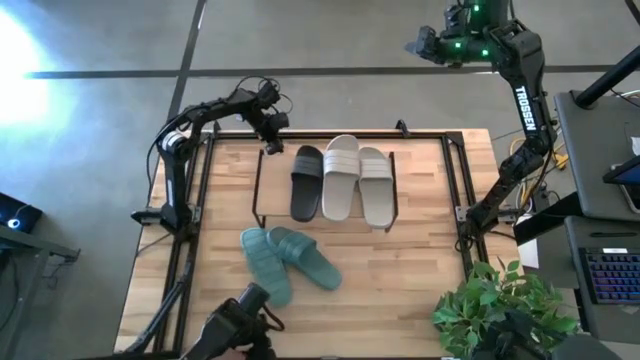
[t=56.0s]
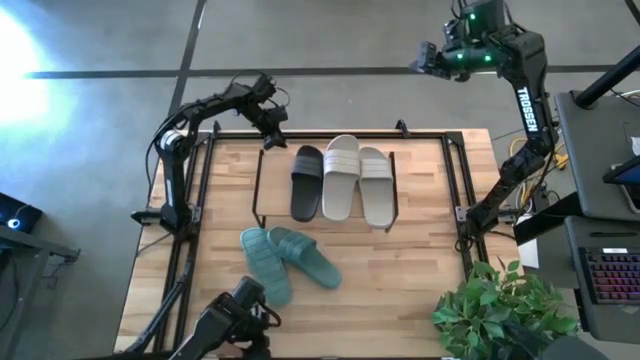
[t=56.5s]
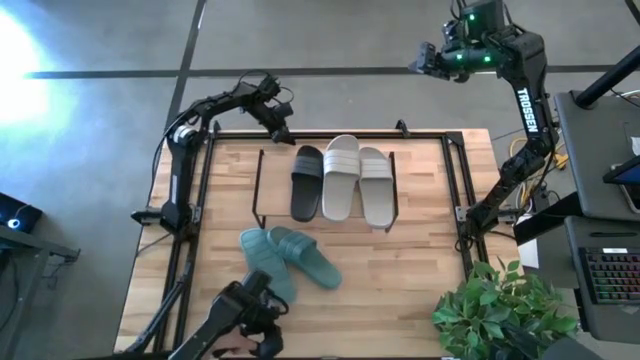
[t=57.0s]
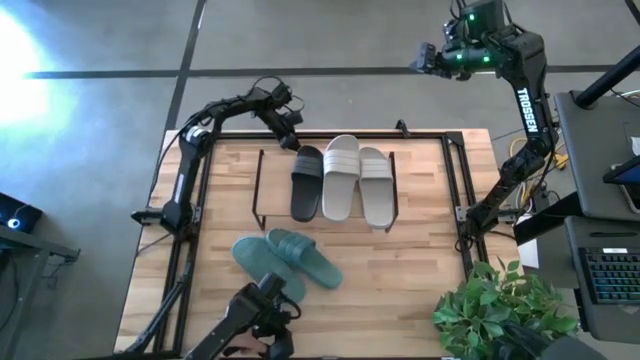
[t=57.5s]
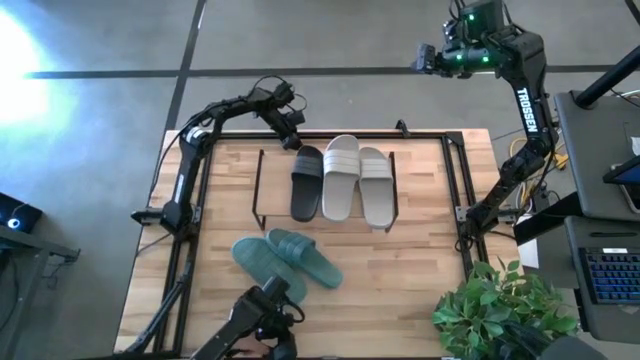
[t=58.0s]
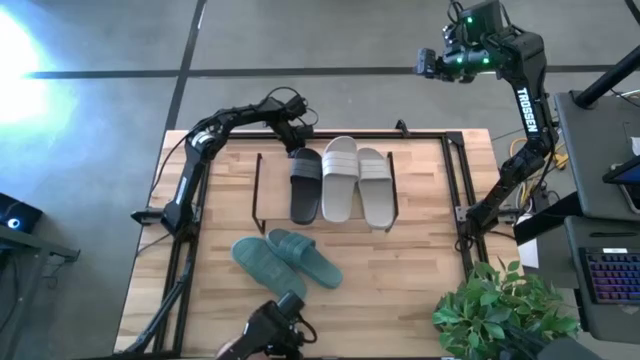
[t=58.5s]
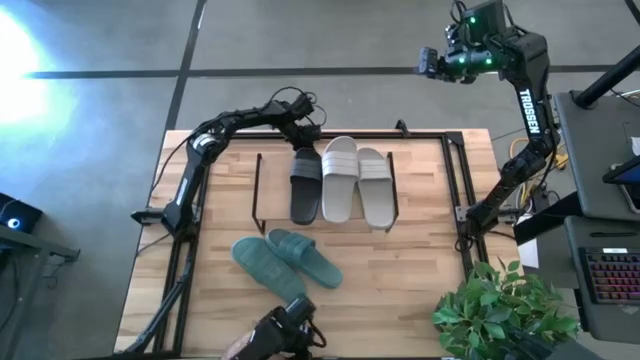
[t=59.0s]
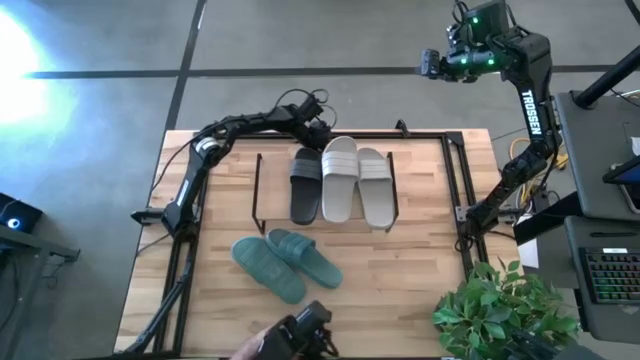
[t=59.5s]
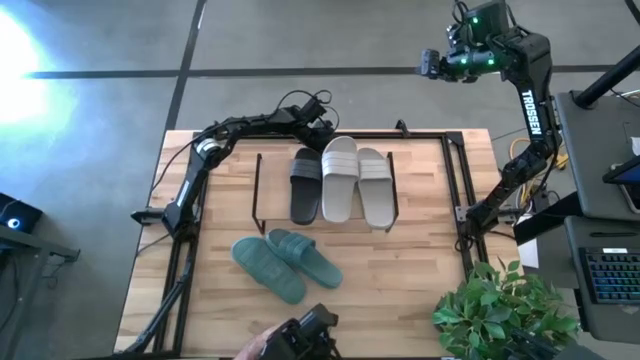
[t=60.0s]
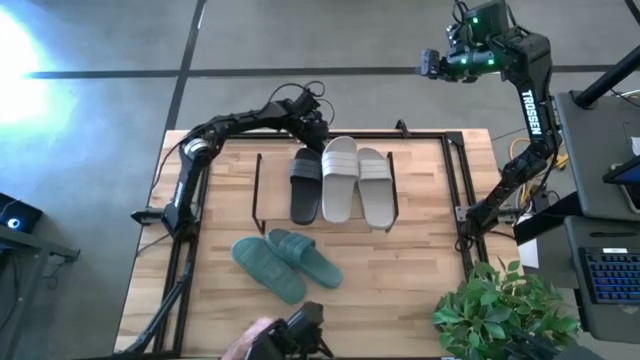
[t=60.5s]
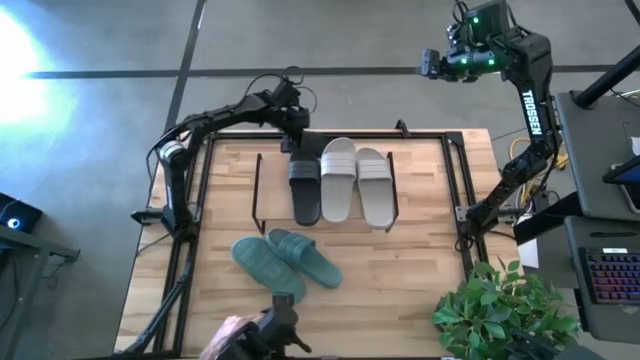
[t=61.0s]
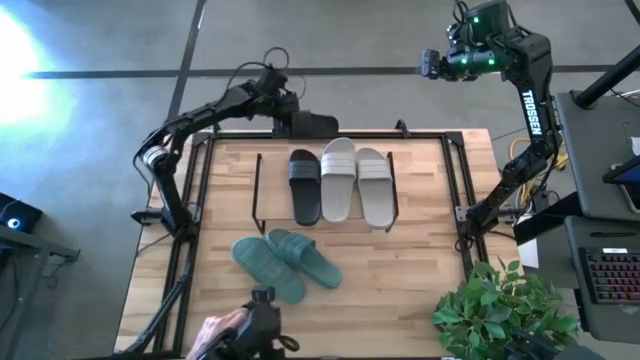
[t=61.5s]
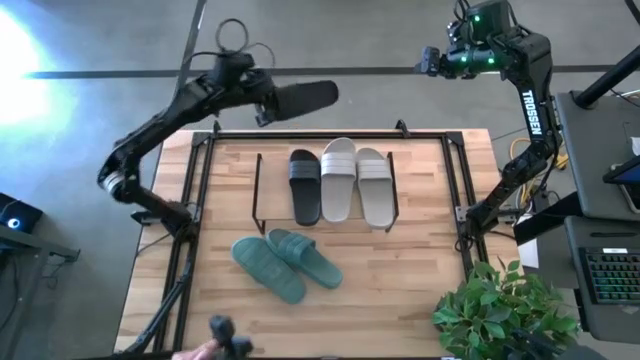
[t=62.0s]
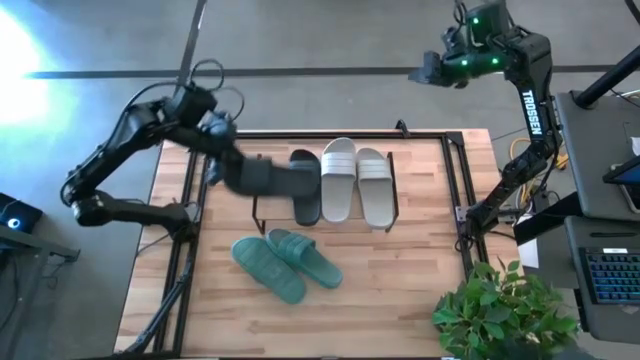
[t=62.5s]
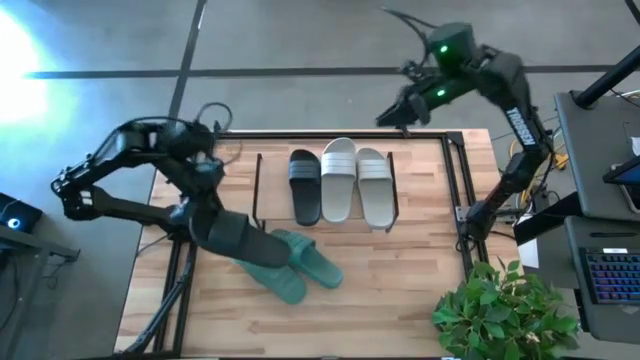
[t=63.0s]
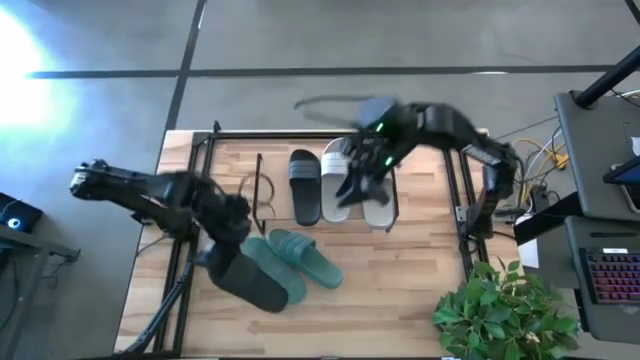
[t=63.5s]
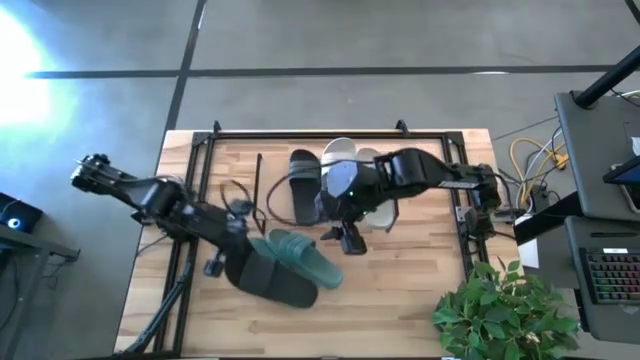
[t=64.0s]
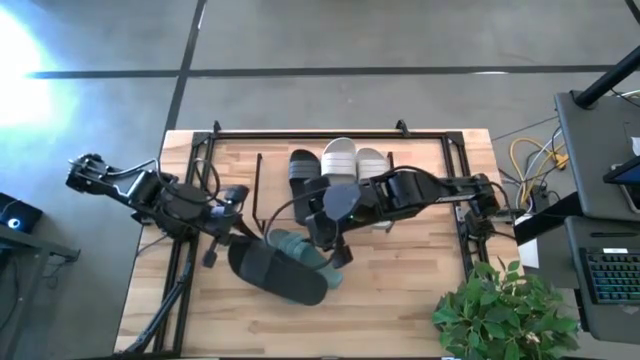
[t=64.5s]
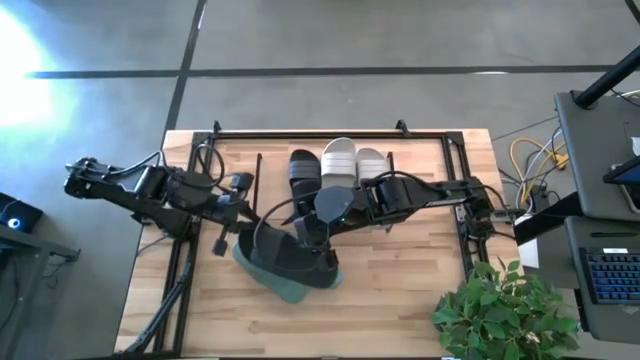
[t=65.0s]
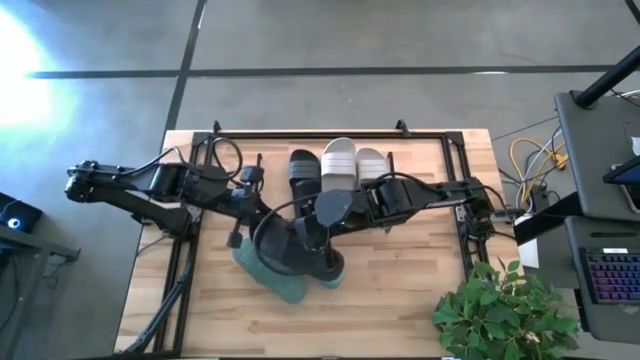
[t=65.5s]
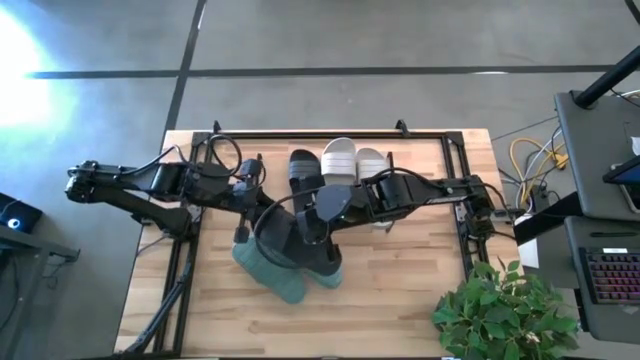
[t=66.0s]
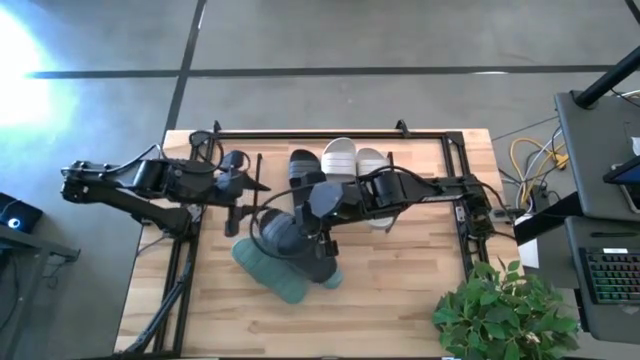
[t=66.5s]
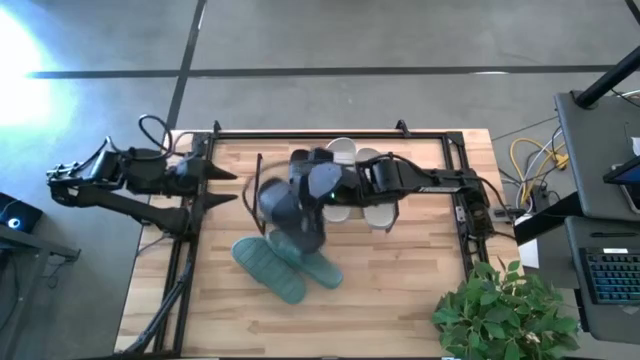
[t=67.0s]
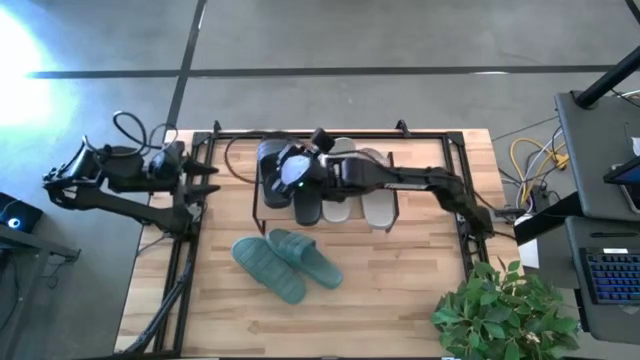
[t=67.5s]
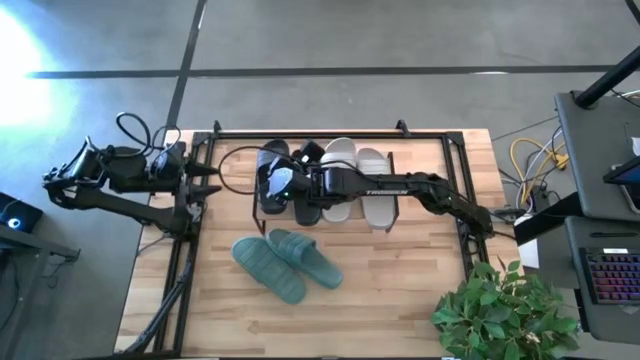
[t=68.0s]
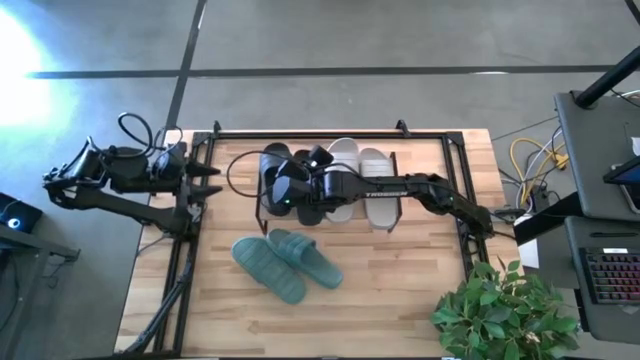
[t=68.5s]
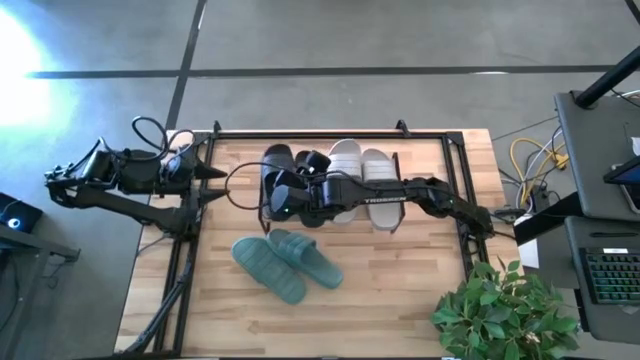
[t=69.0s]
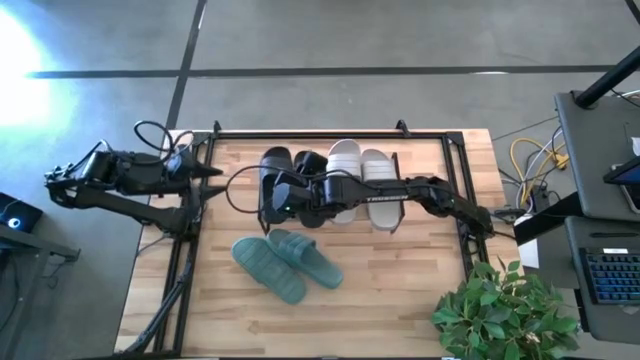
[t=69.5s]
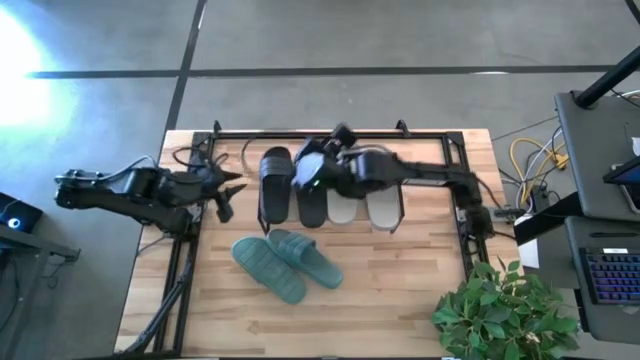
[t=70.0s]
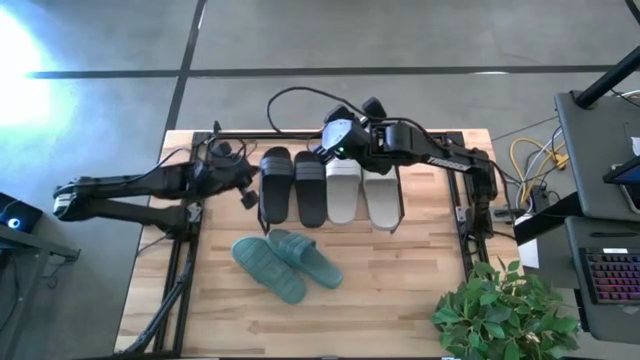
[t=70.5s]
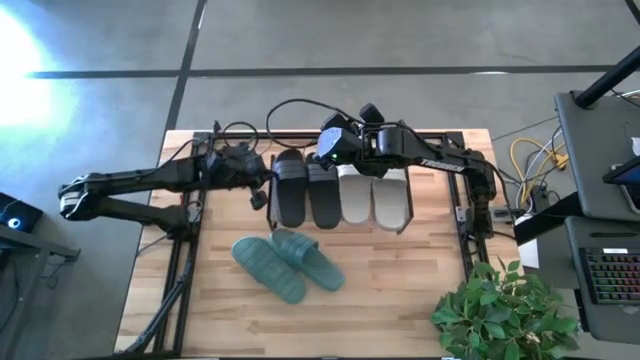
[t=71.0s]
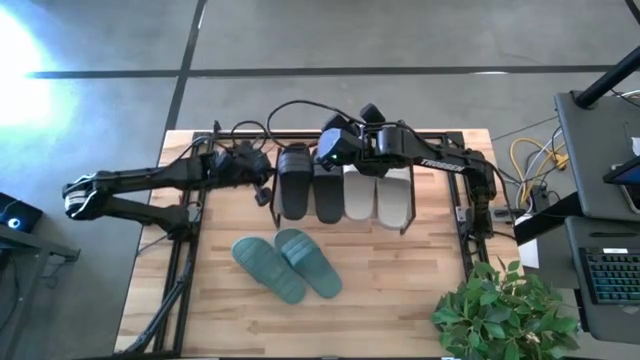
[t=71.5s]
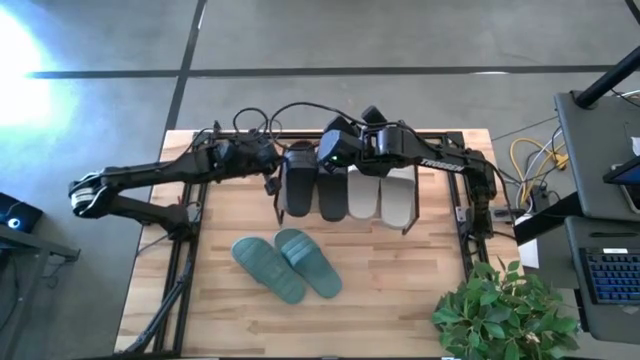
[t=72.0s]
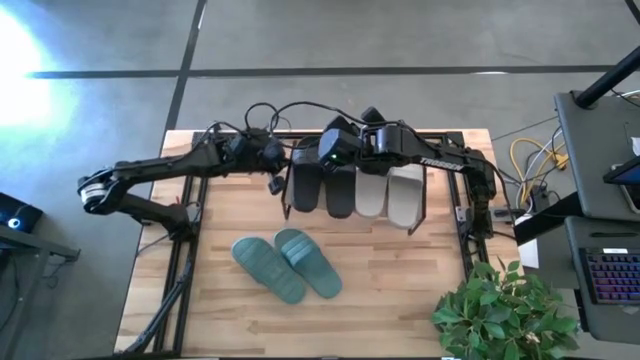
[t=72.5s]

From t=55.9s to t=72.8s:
Task: Pick and place slides into the shelf
Put the black slide on the shelf

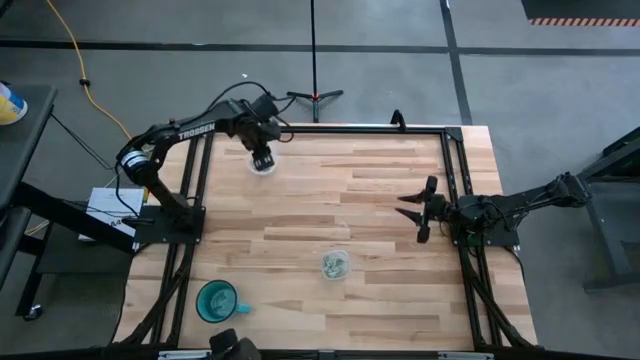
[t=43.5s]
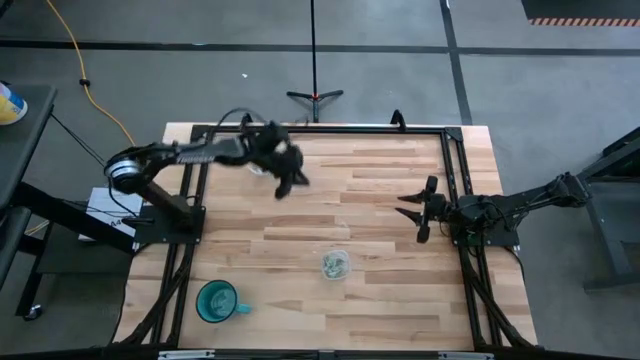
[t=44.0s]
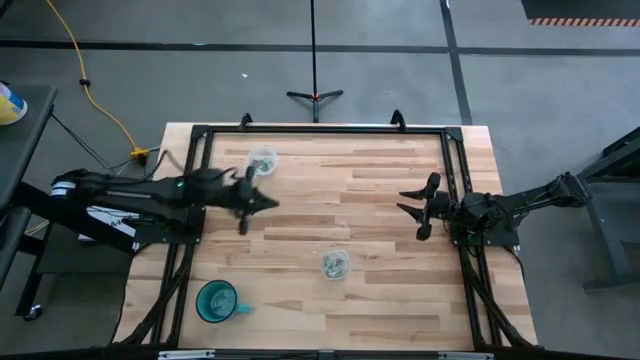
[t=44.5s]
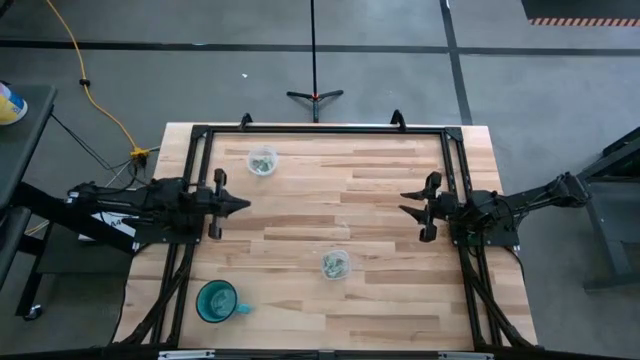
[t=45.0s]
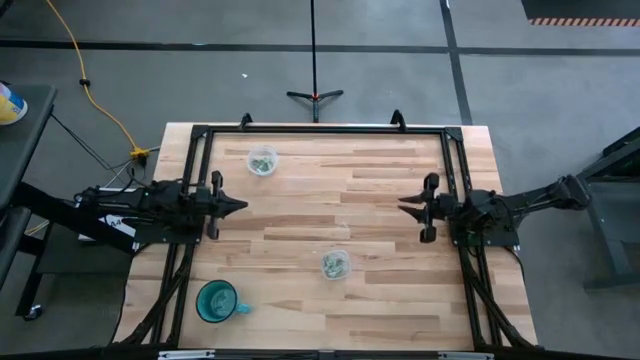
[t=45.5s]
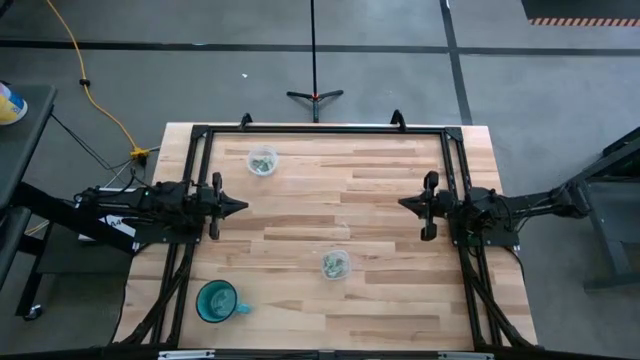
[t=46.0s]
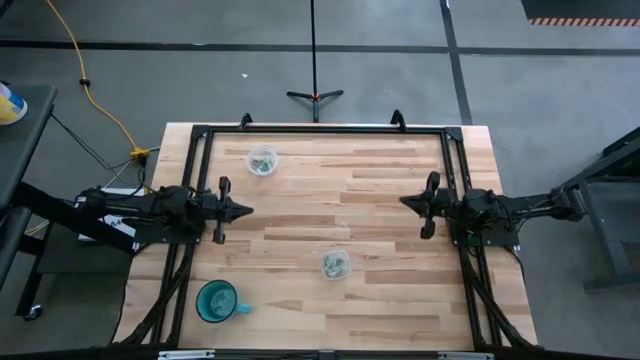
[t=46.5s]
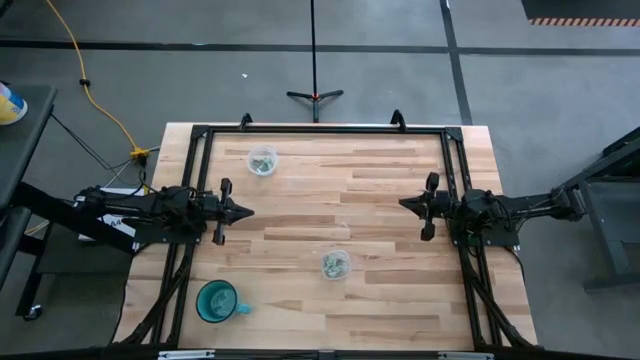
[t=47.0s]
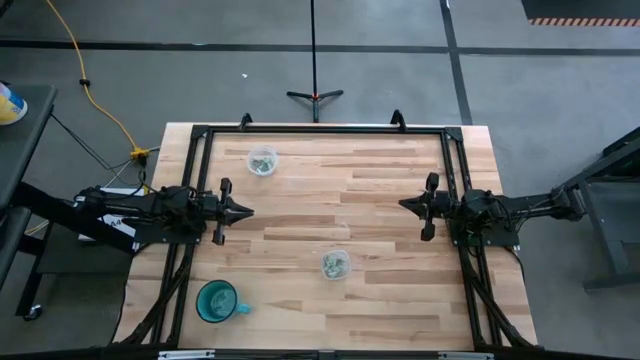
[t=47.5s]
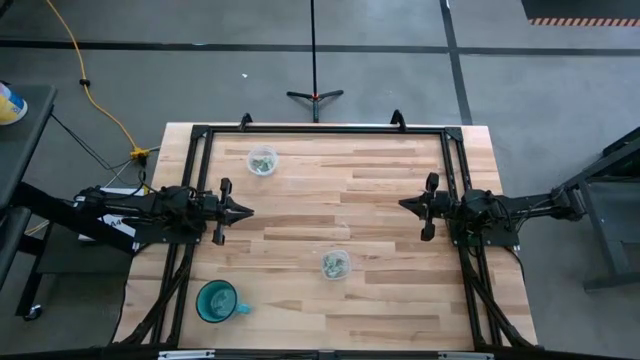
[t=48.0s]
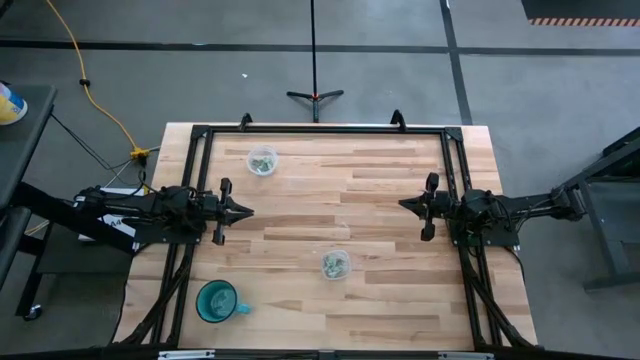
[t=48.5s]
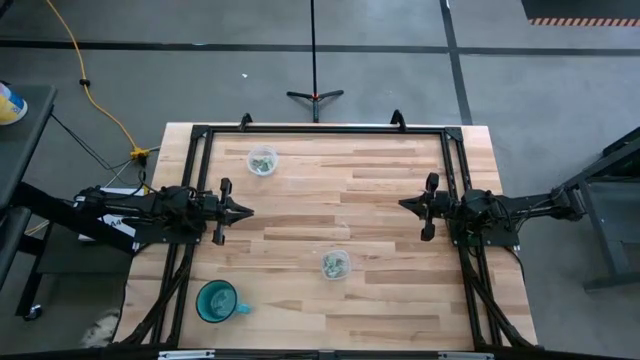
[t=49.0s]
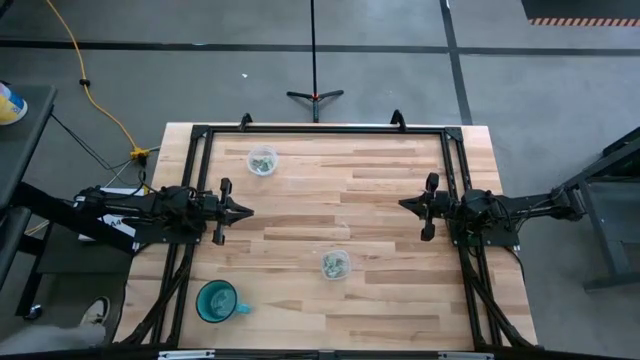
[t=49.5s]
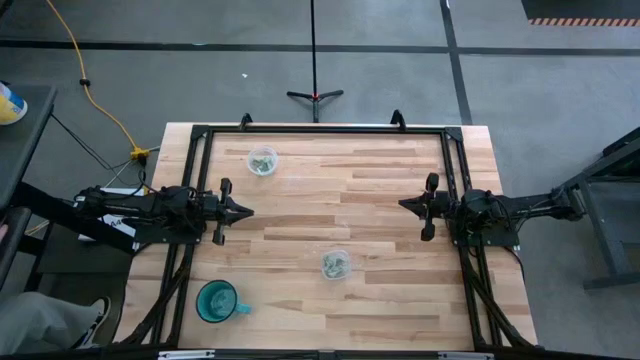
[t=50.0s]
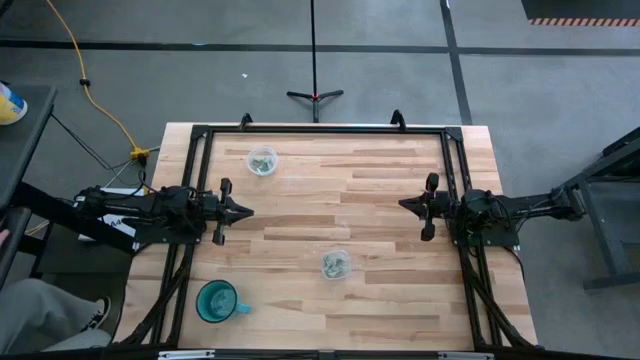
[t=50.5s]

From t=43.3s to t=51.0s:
Task: Pick and place Stevia / Truvia into bins
Return to Home Position
